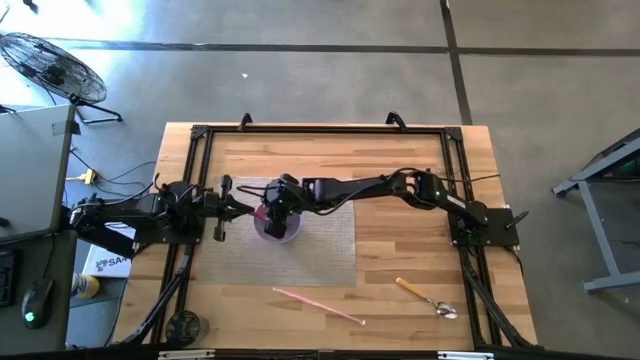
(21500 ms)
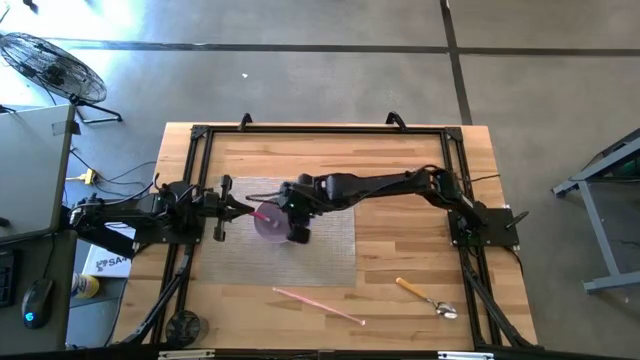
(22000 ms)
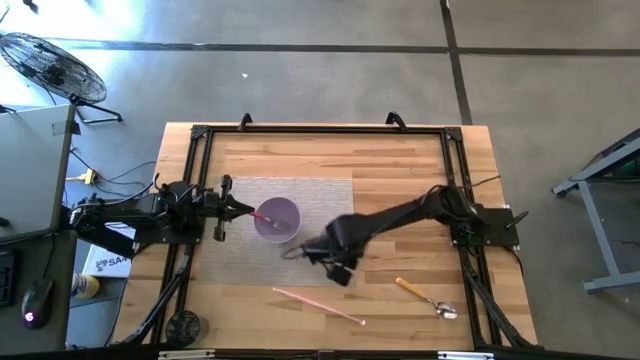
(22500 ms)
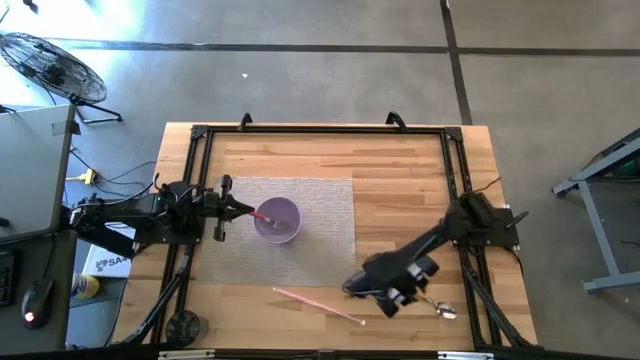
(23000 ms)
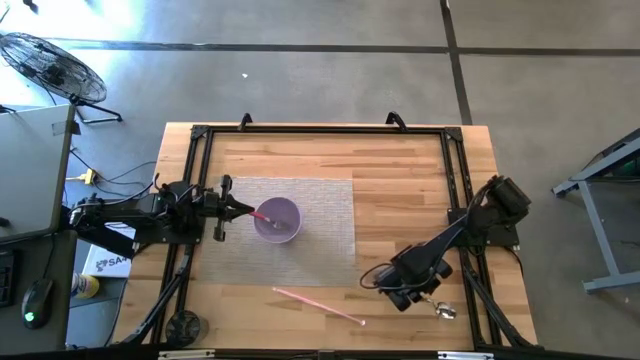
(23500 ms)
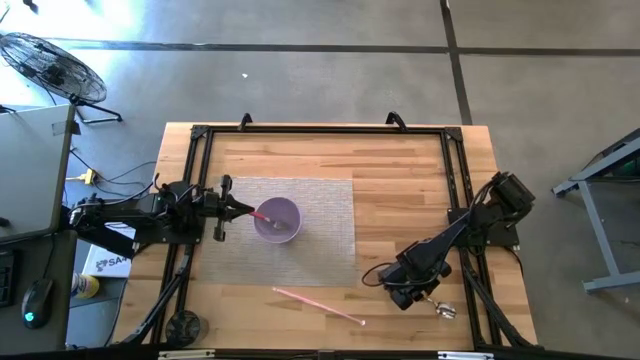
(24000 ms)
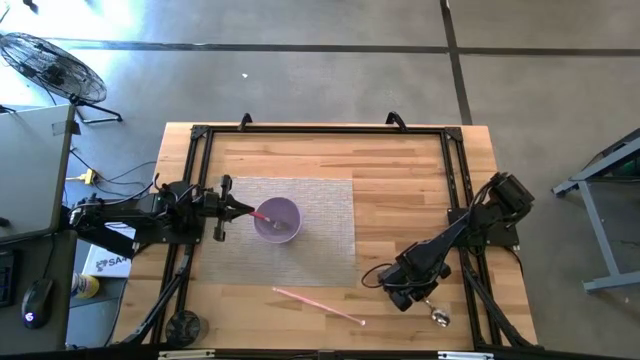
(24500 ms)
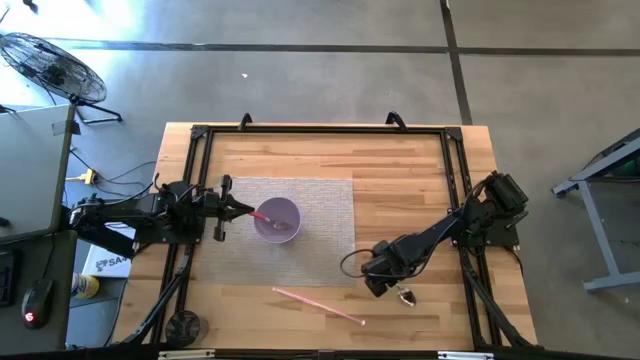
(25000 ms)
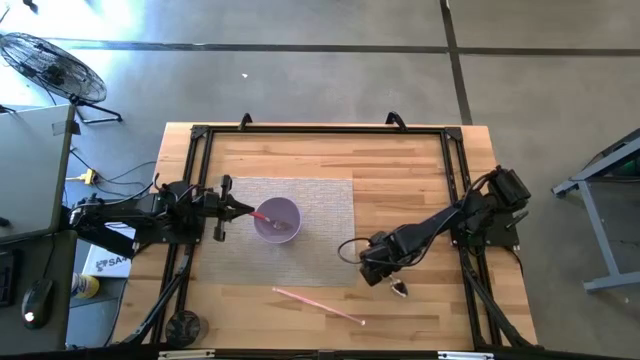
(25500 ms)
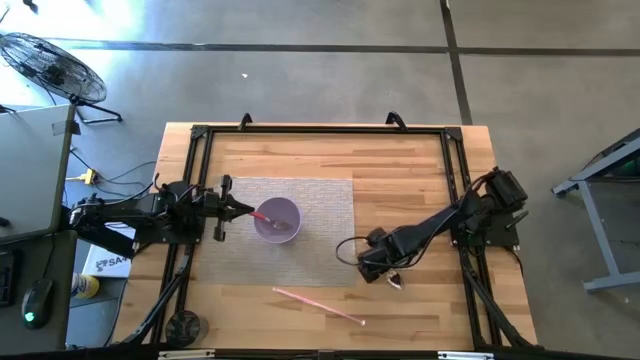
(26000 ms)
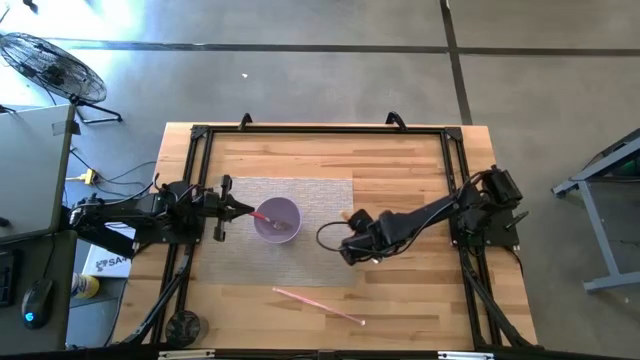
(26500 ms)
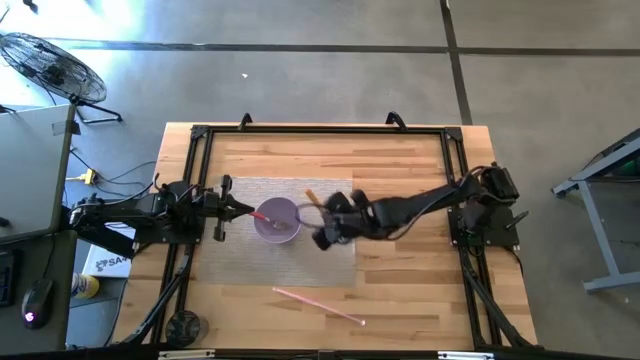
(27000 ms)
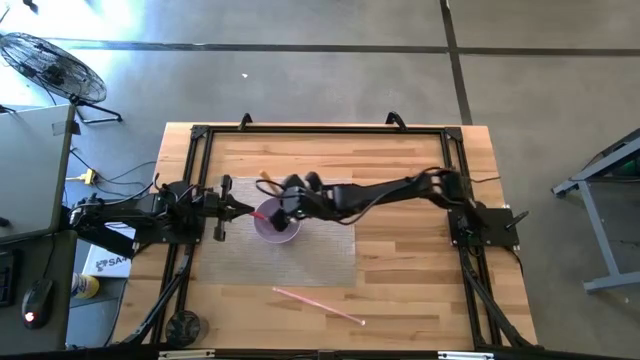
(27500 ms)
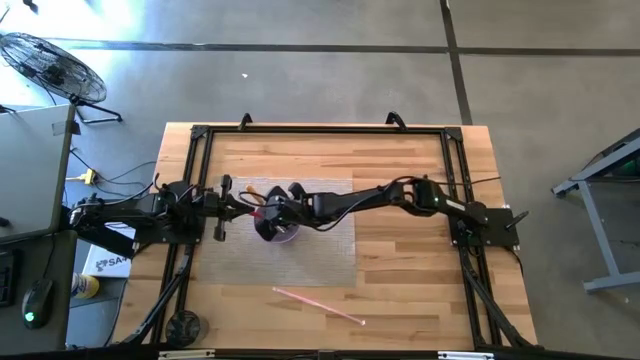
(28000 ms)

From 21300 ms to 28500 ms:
Task: Pick & Place Utensil
Put the yellow spoon into the purple bowl on the brown placemat

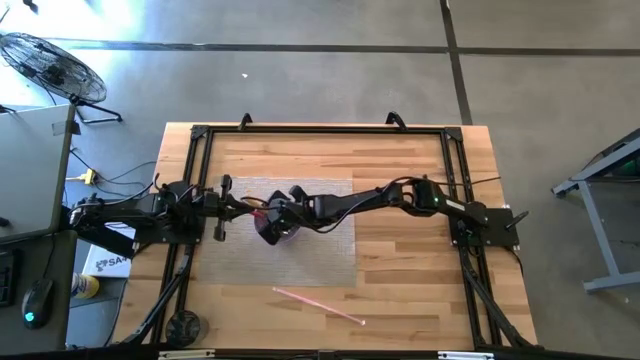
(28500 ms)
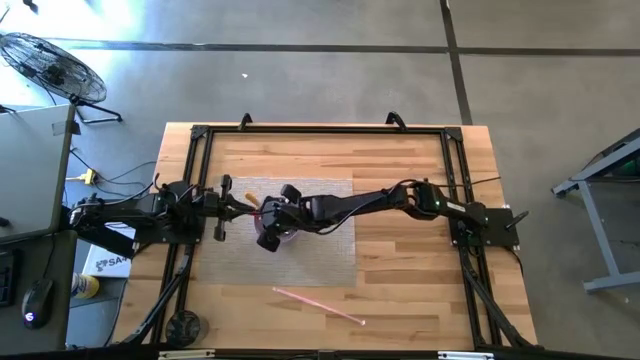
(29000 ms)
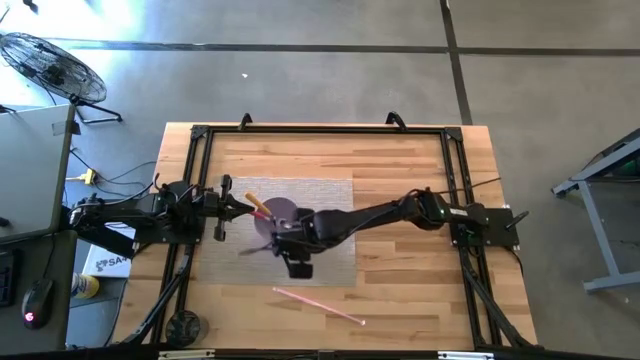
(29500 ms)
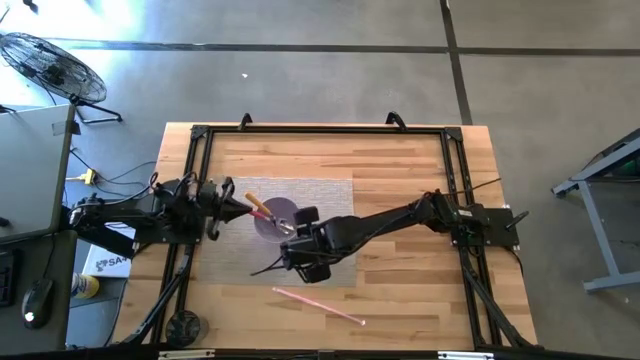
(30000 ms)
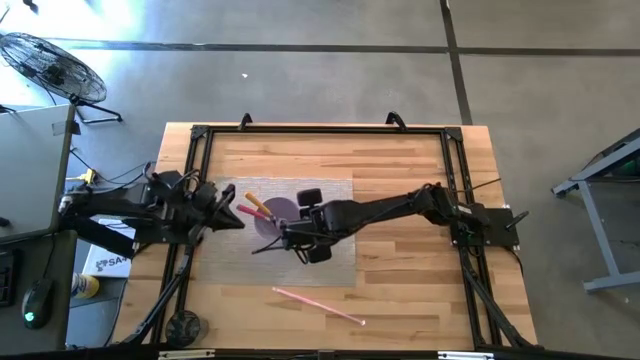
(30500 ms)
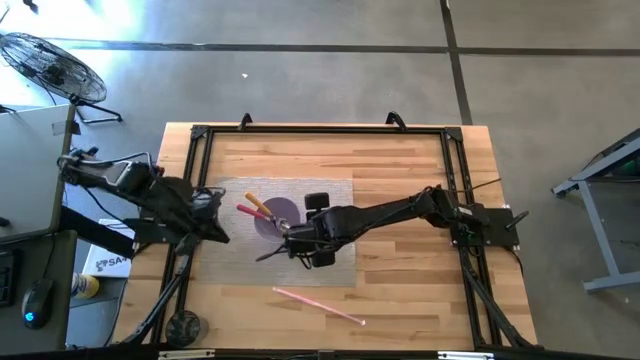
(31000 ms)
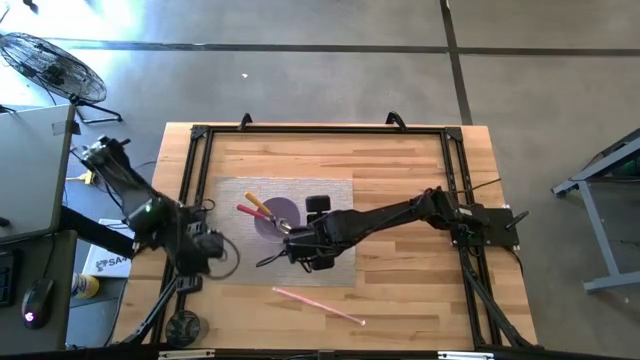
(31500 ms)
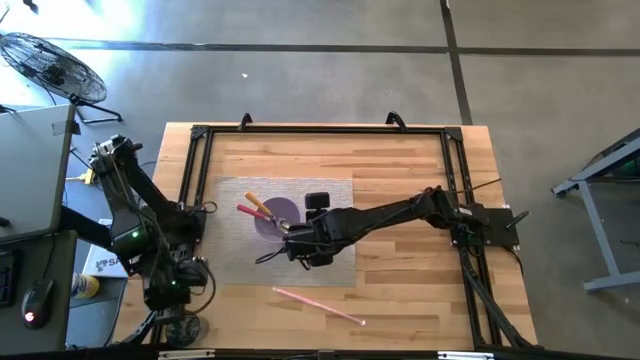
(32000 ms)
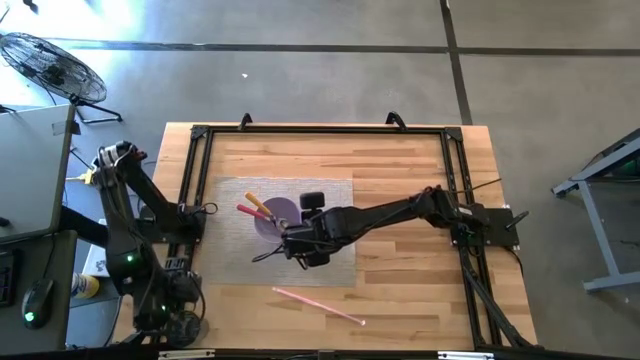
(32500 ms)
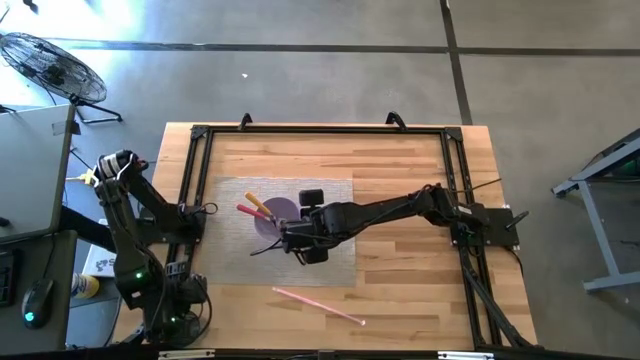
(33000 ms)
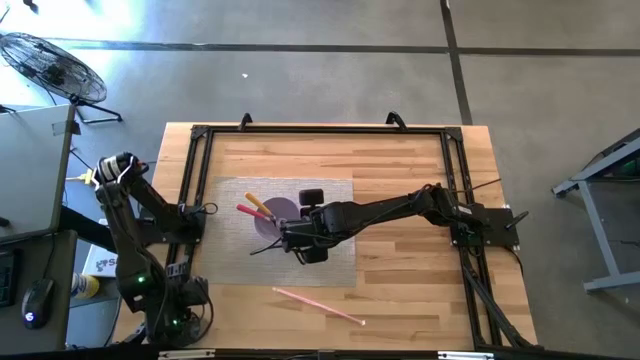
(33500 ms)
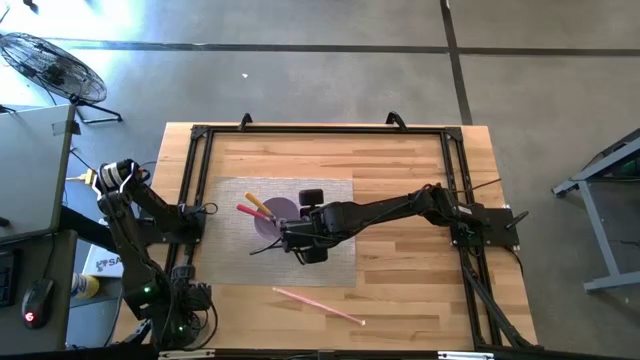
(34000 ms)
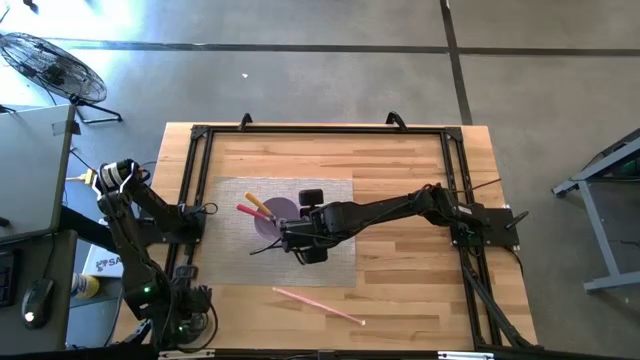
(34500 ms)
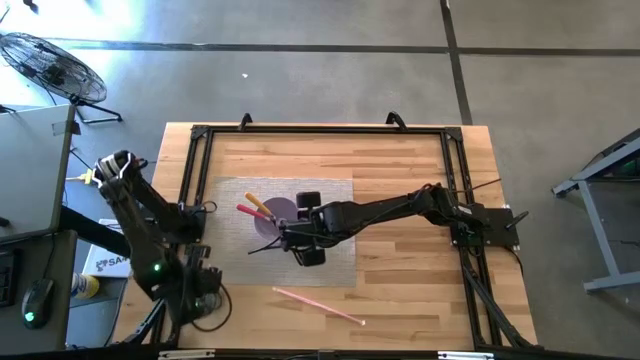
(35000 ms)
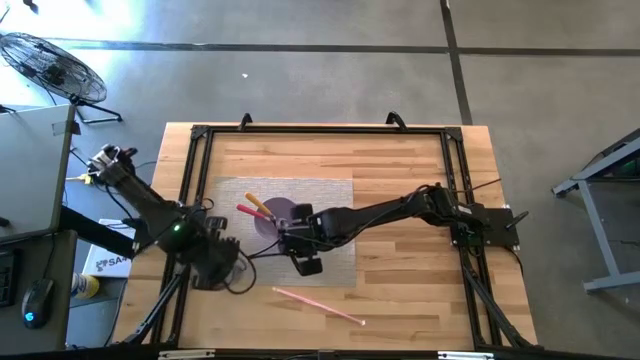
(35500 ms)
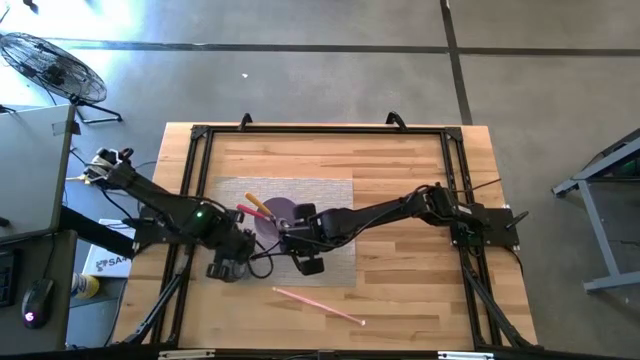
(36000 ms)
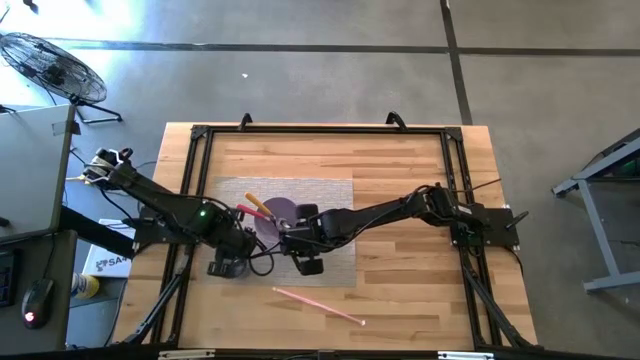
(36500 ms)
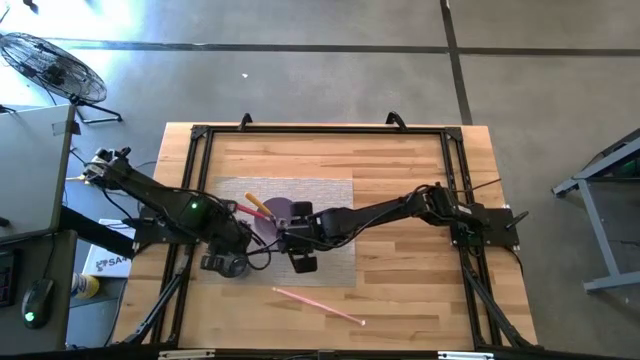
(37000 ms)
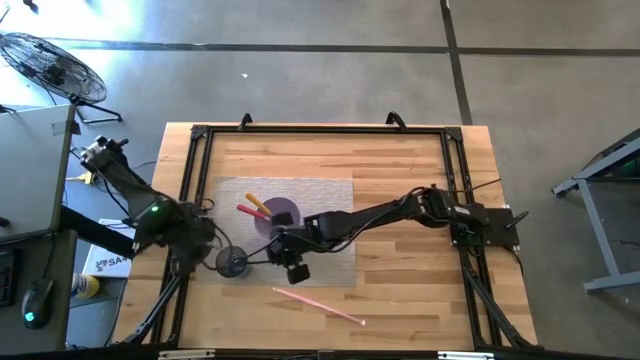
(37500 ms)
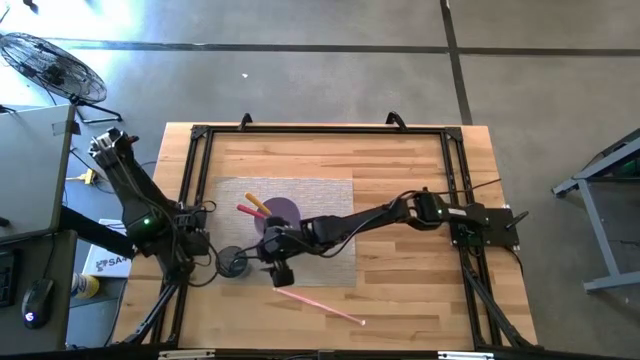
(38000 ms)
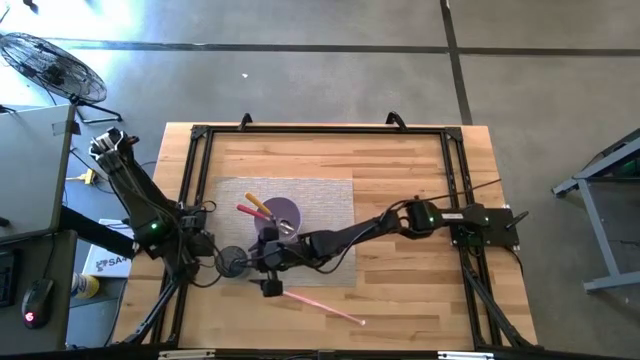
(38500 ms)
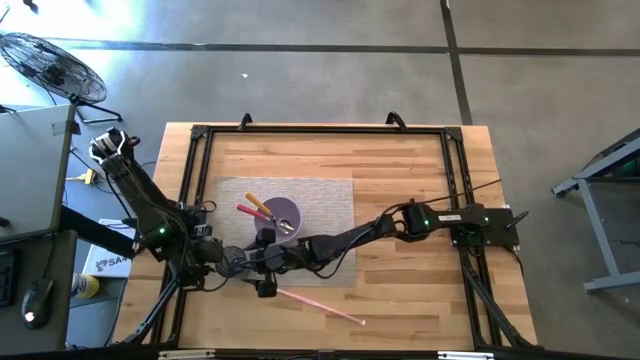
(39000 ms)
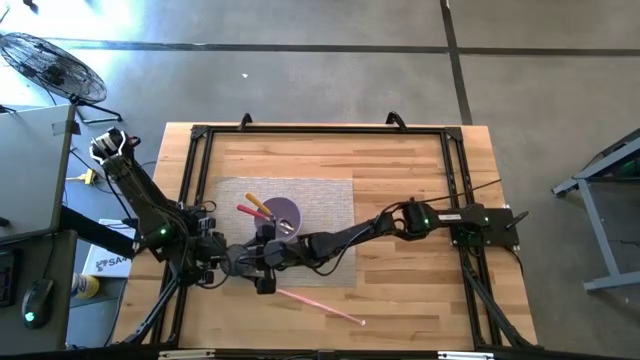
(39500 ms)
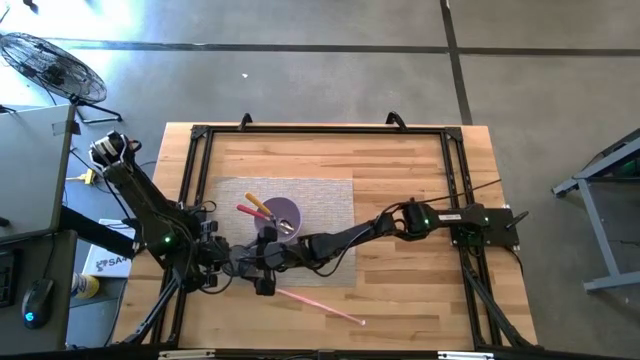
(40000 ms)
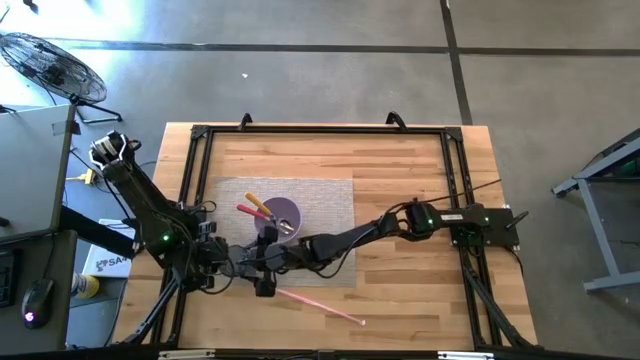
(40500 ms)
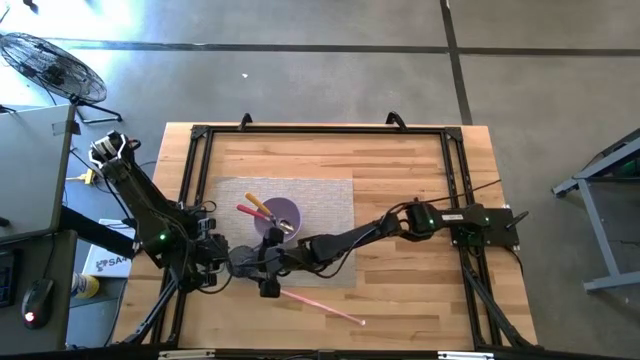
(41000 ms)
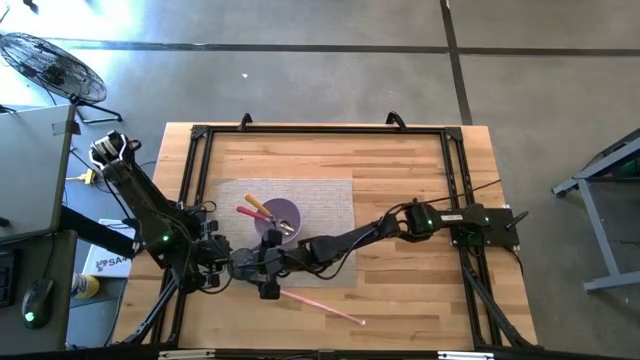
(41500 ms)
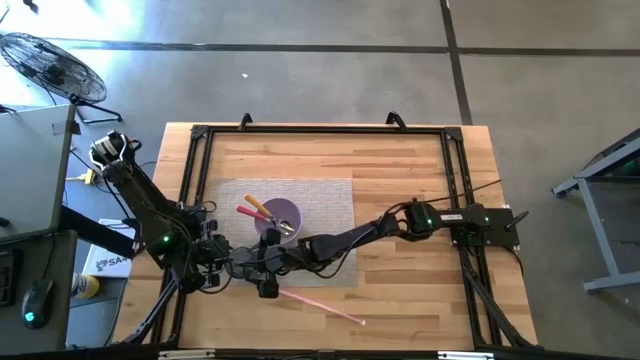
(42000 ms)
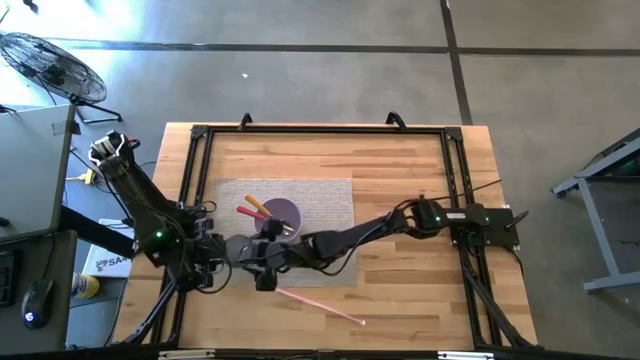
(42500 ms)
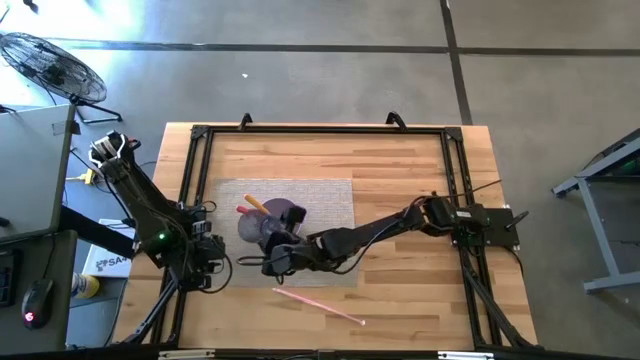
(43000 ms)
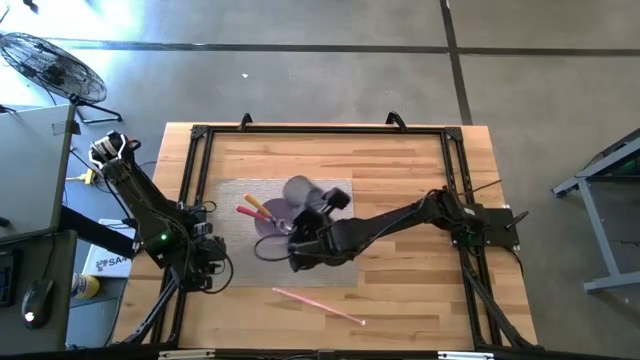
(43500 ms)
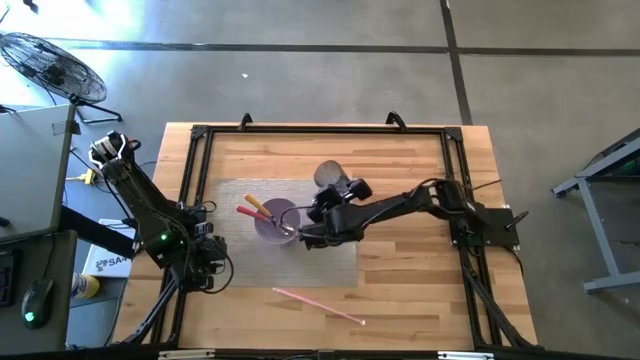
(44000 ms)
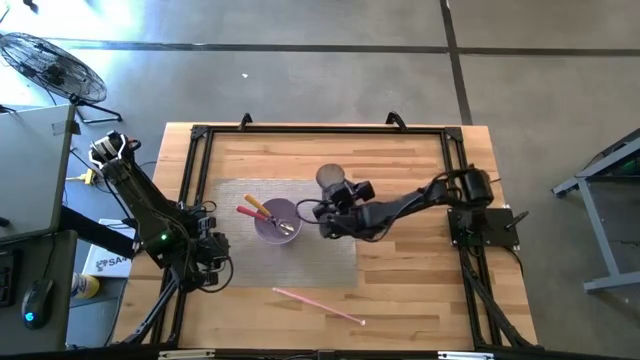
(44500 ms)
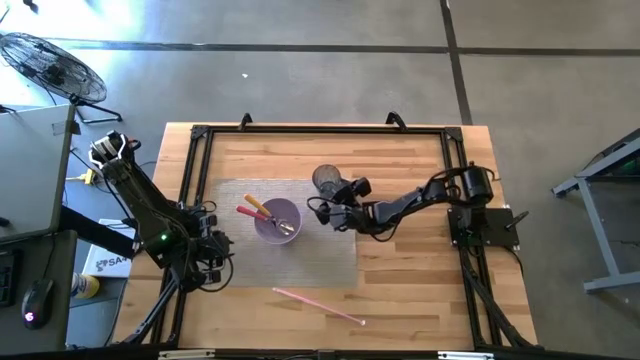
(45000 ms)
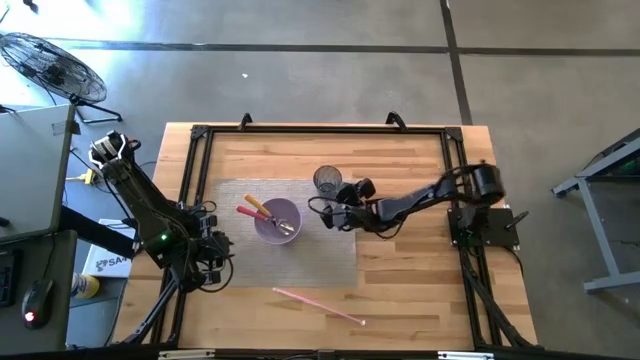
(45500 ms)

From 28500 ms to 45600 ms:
Put the blue cup on the top right of the brown placemat
